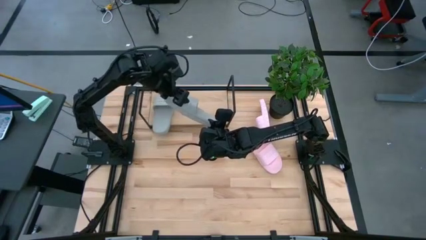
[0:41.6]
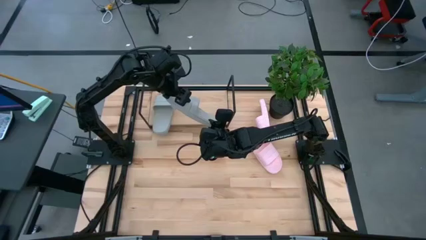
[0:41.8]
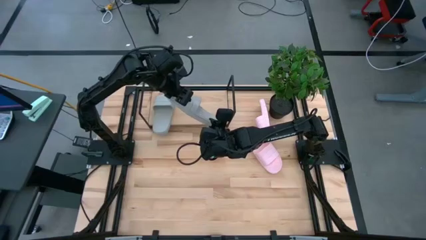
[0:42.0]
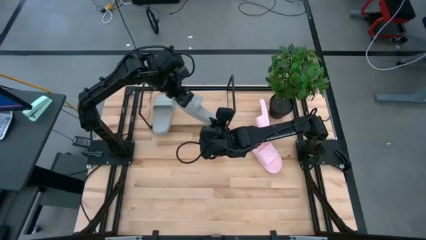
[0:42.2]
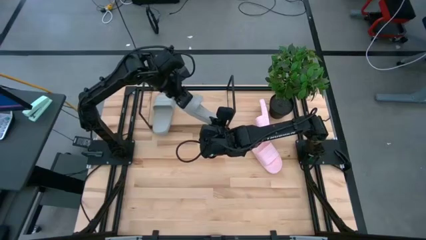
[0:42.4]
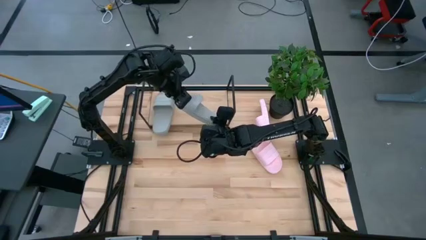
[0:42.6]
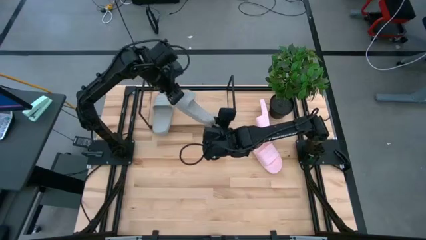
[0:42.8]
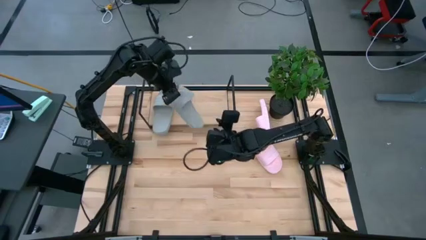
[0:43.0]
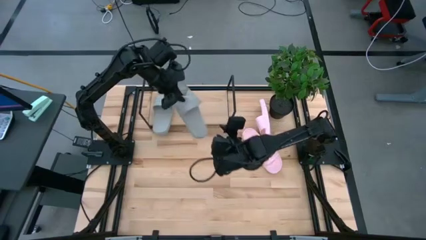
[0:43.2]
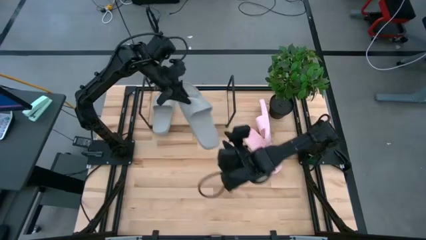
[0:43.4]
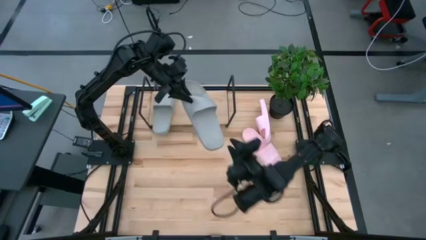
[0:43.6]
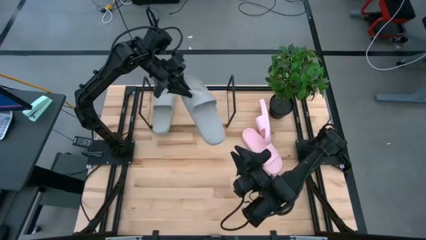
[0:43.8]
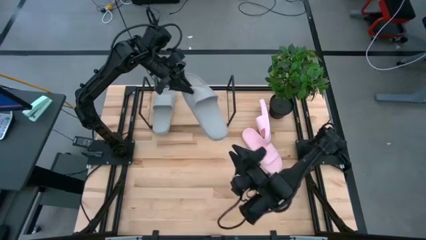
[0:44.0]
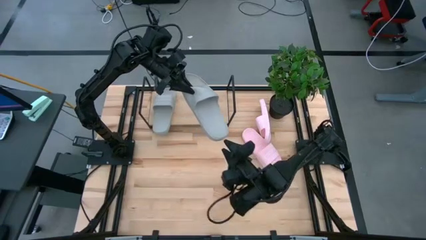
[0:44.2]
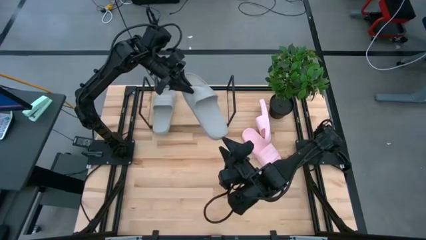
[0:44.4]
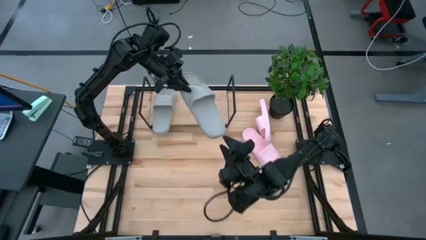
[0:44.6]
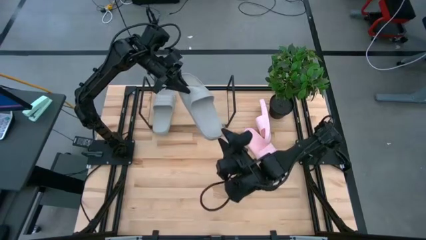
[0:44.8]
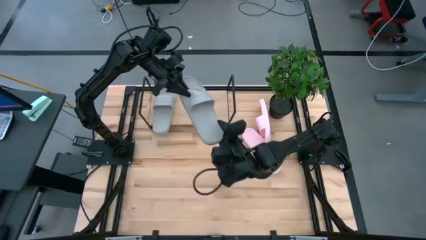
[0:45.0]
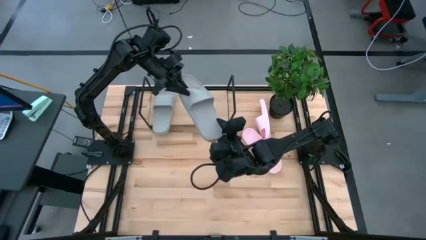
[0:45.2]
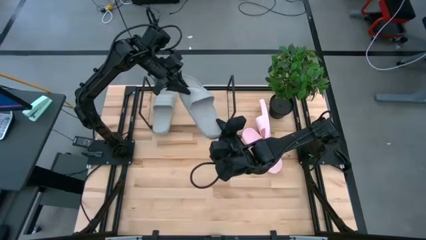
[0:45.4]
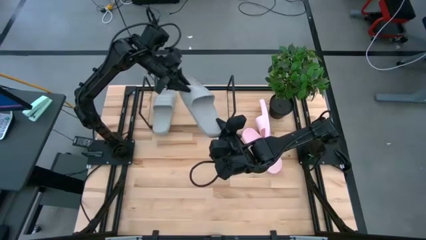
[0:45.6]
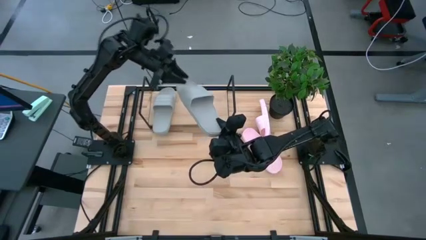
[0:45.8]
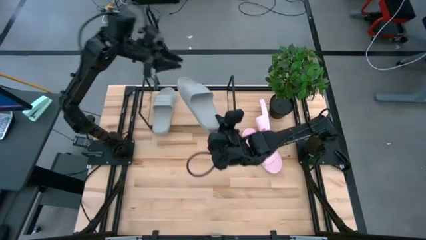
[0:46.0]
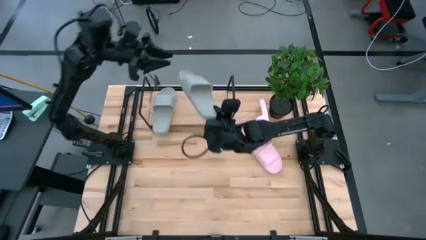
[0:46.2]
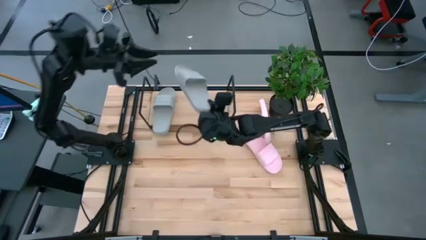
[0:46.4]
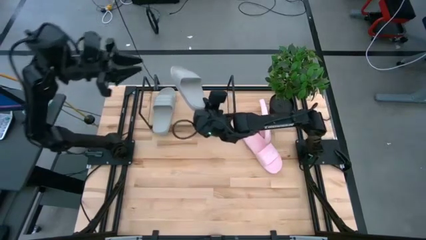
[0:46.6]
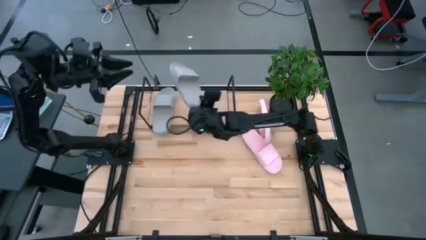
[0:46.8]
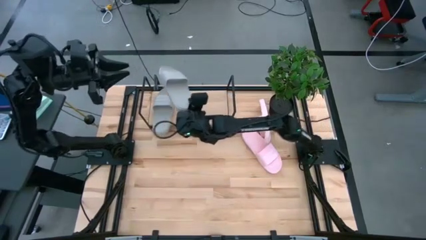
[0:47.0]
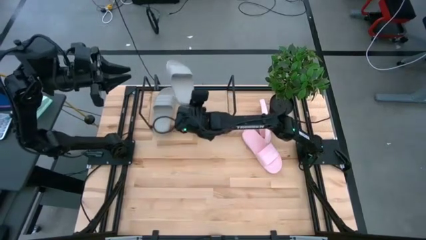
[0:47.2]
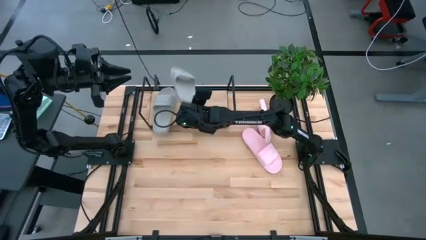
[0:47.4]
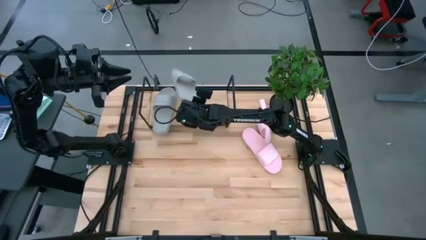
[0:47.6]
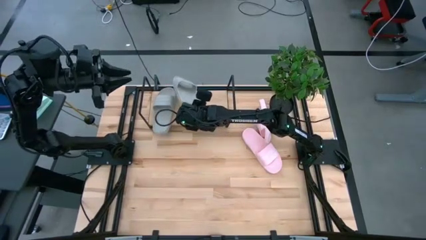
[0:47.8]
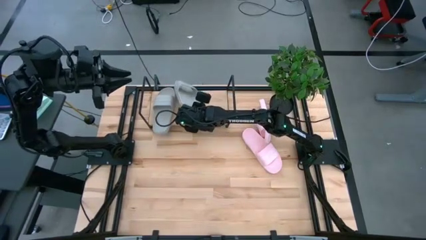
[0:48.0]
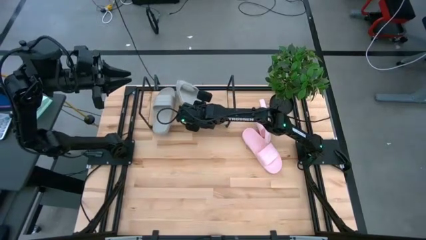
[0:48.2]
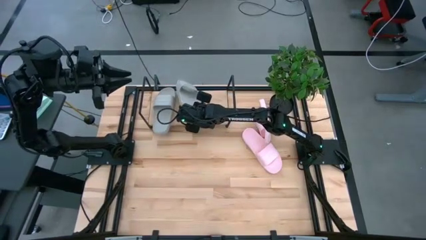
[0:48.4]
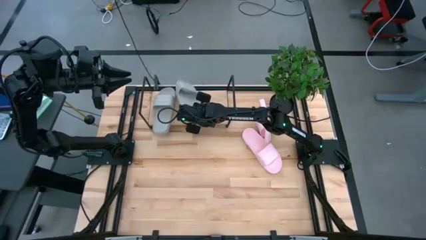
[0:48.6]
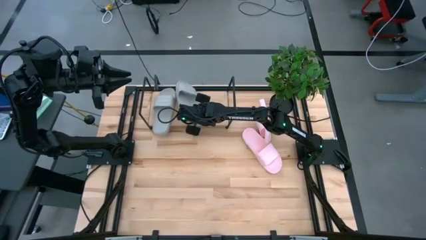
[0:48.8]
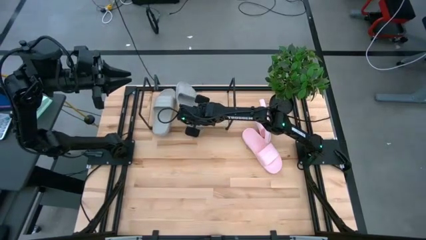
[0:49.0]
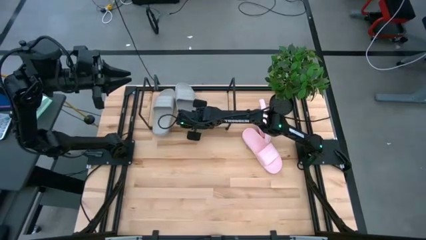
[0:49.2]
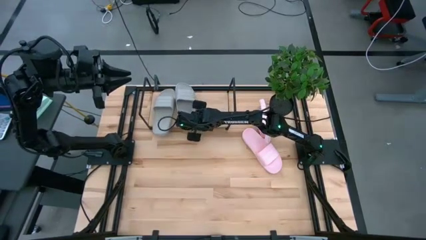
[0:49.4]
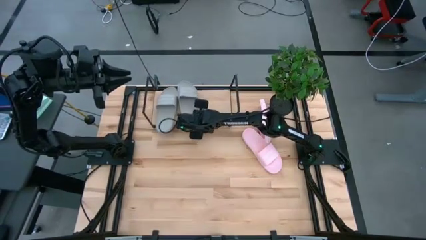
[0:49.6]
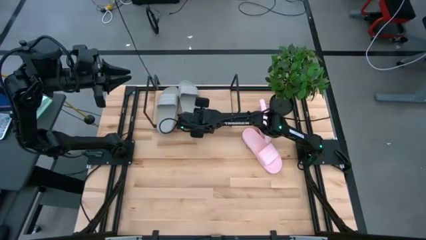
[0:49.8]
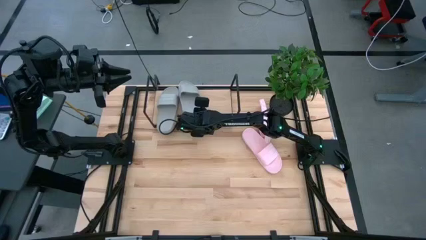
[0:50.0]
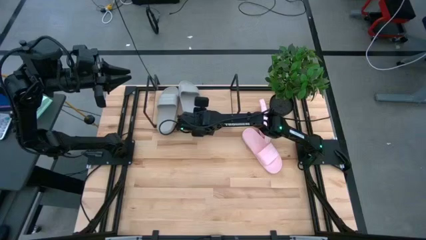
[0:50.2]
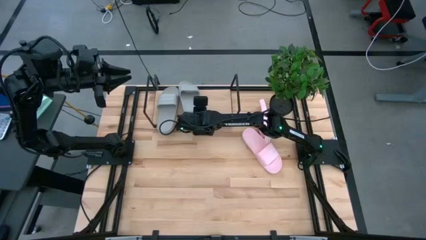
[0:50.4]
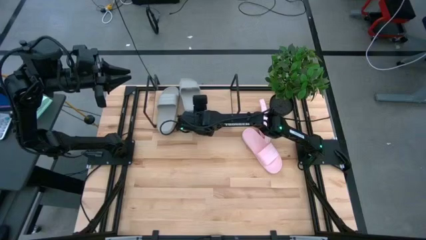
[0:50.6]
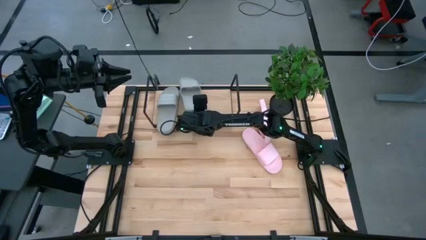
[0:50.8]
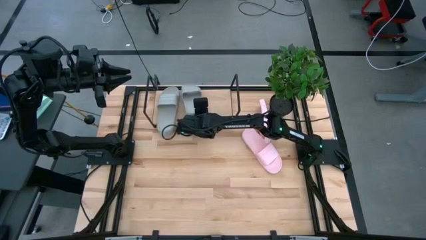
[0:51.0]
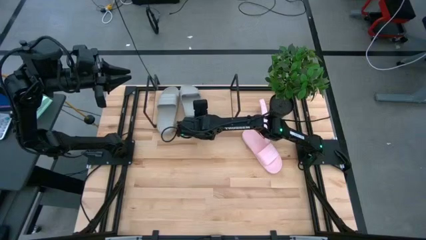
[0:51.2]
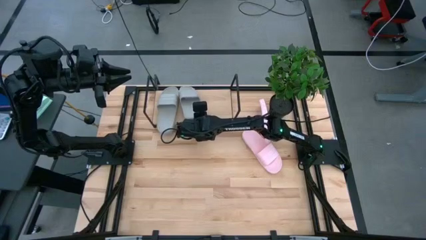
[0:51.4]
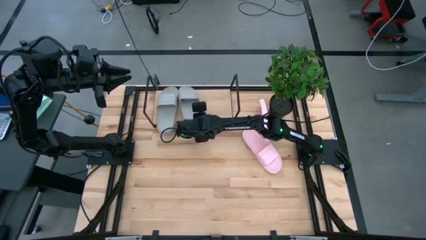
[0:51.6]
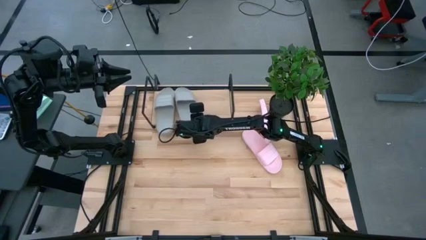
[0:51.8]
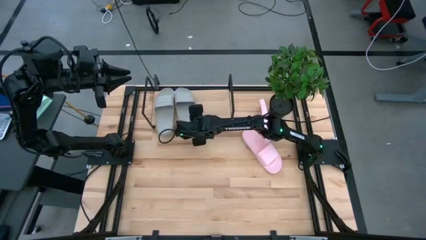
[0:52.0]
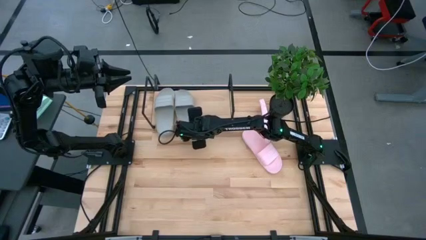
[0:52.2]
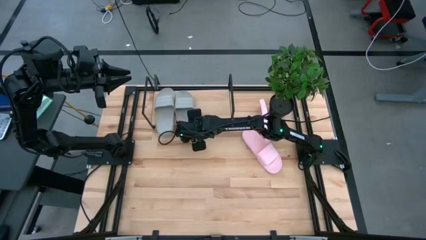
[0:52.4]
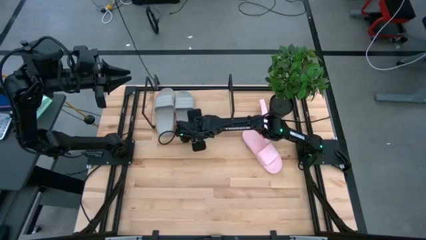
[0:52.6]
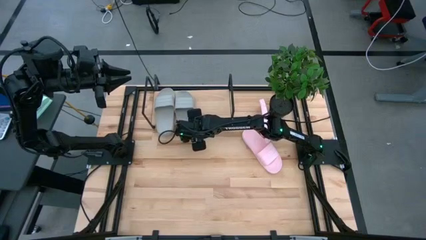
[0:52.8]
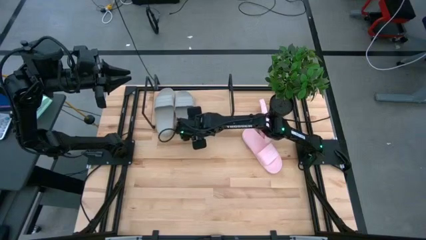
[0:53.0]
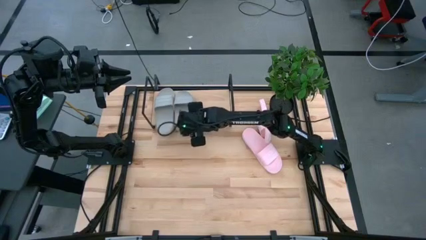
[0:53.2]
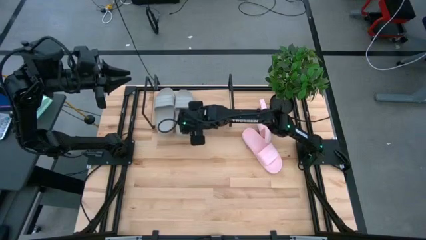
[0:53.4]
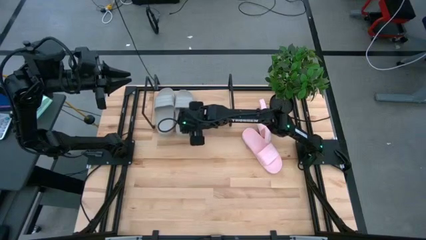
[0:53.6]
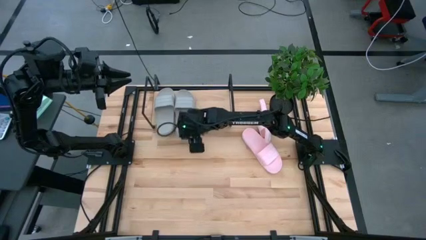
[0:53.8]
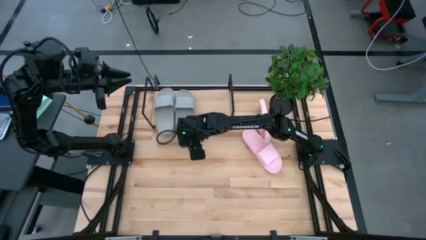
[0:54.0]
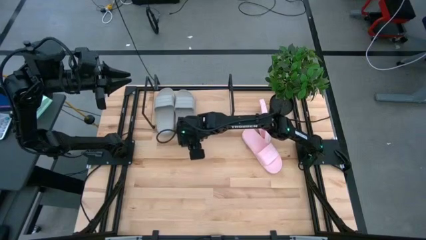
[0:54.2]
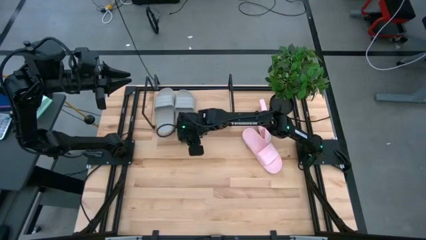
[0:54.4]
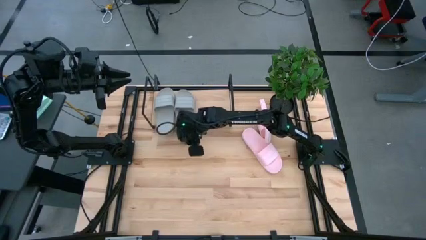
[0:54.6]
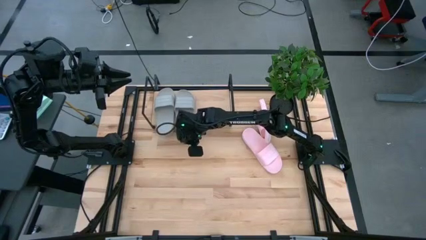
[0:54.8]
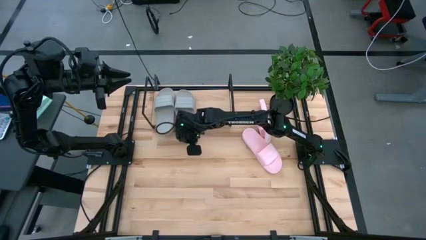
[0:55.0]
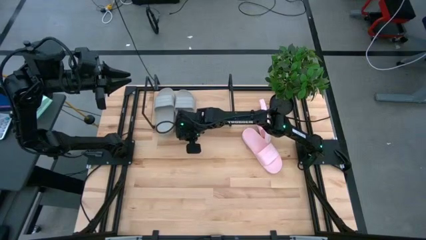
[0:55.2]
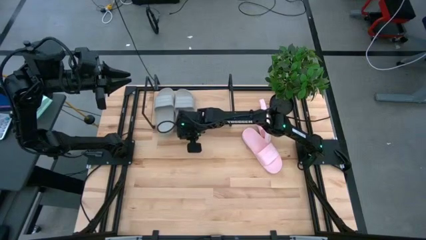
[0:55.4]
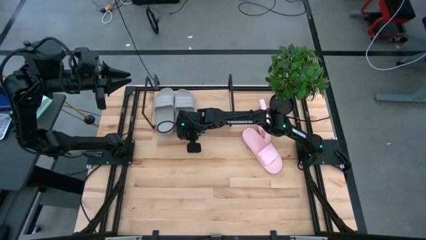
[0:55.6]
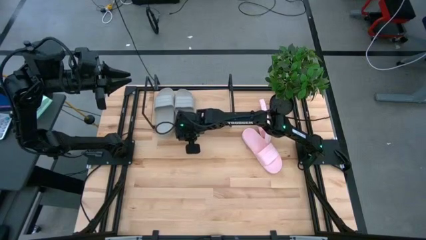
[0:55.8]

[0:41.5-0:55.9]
Task: Pick and place slides into the shelf
Put the gray slipper on the shelf

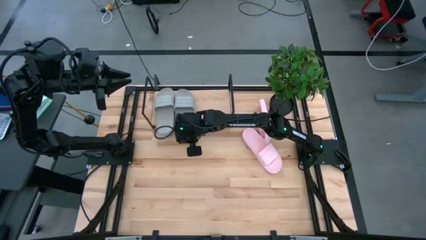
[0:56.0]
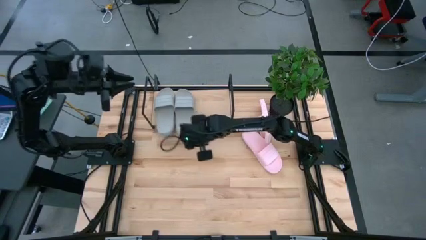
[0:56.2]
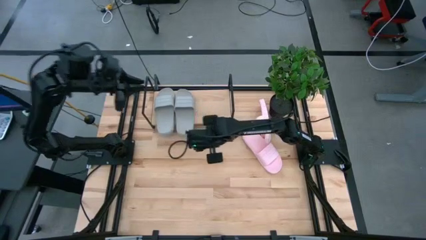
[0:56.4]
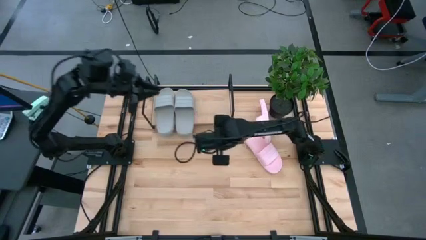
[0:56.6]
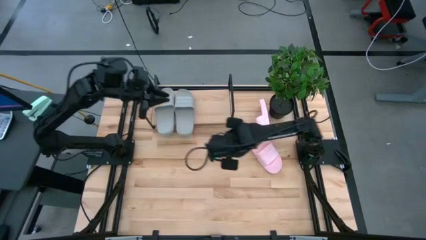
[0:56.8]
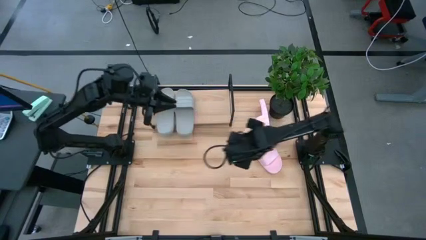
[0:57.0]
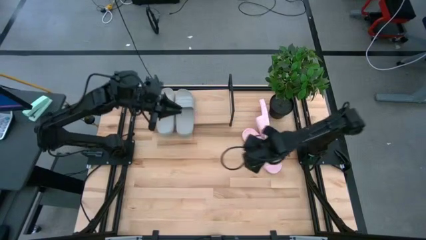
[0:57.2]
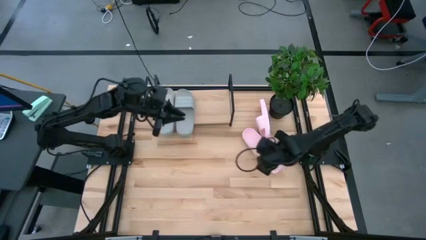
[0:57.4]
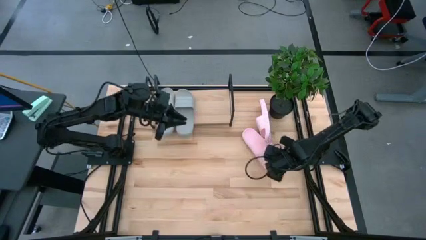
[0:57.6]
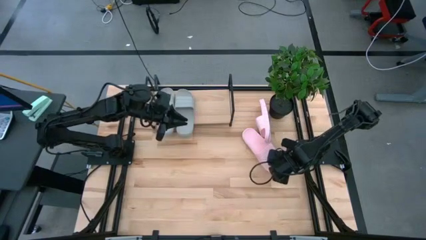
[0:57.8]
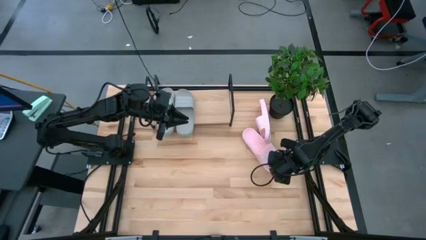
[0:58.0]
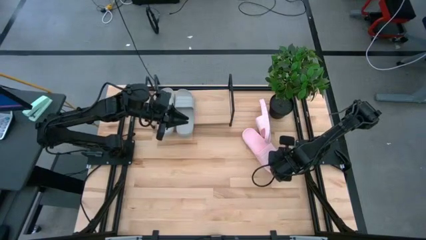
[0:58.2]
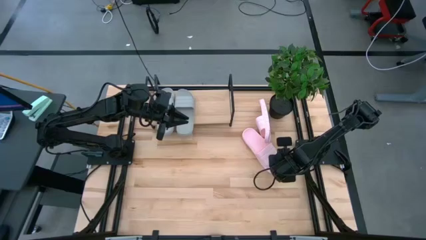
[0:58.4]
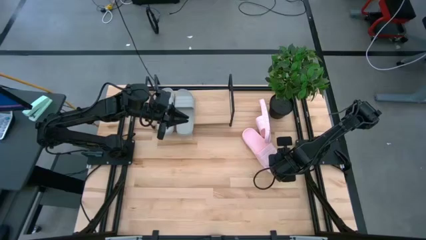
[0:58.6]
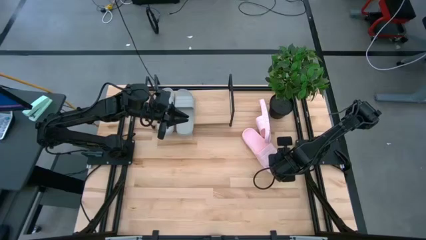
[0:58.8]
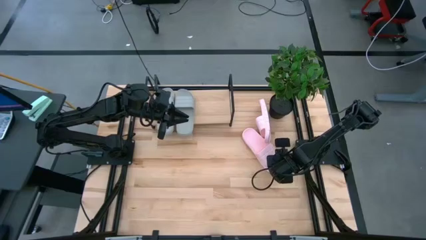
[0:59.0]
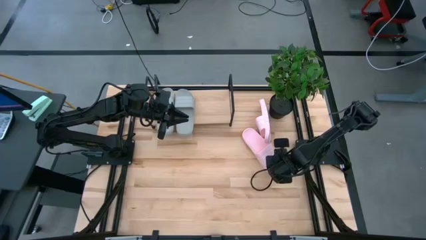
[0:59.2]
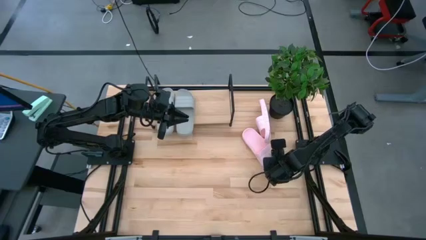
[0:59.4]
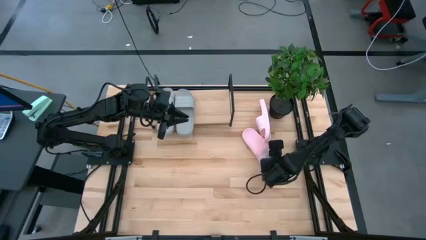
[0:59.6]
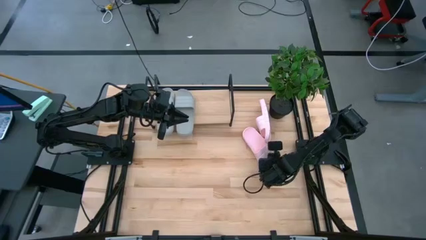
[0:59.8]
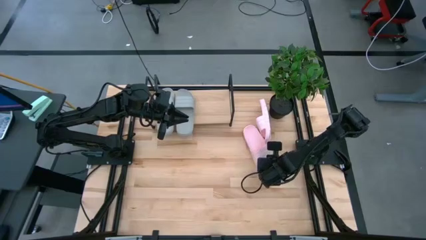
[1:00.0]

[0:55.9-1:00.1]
Put the bottom pink slipper on the shelf
